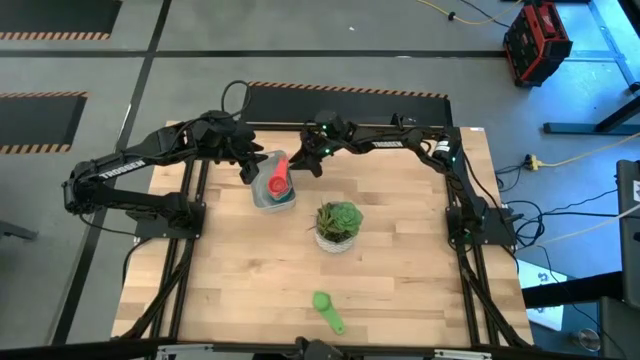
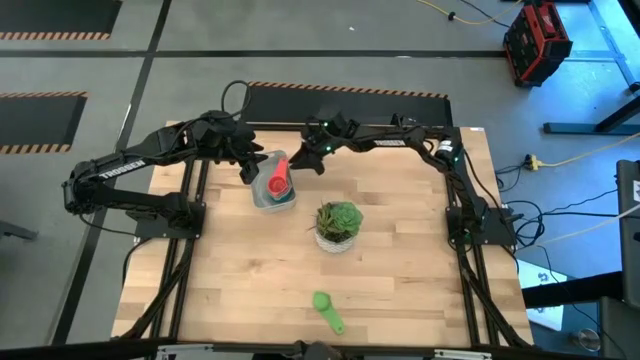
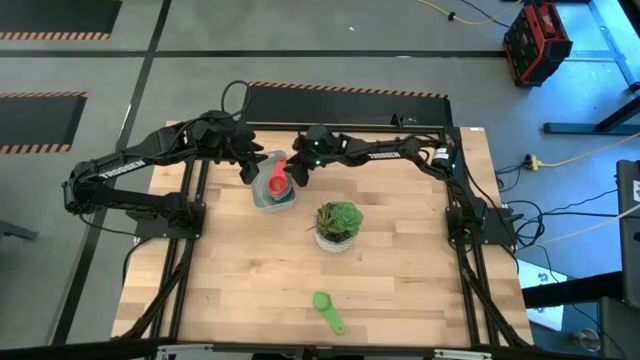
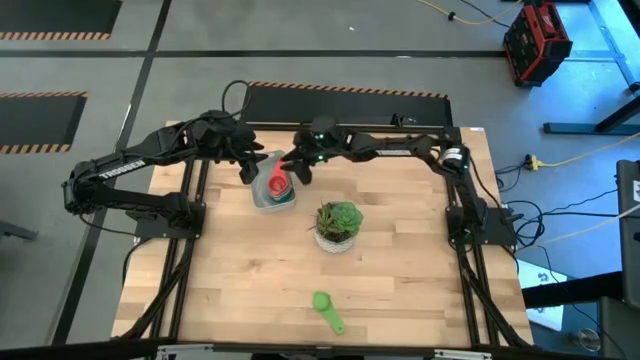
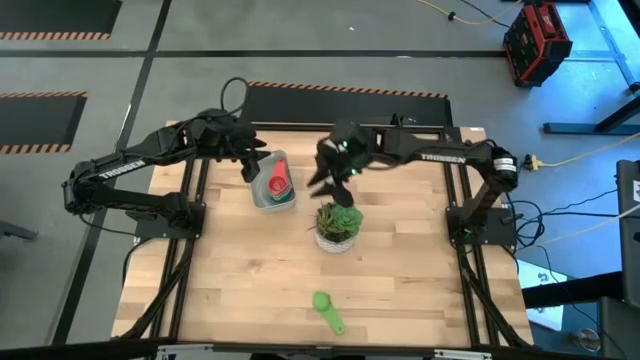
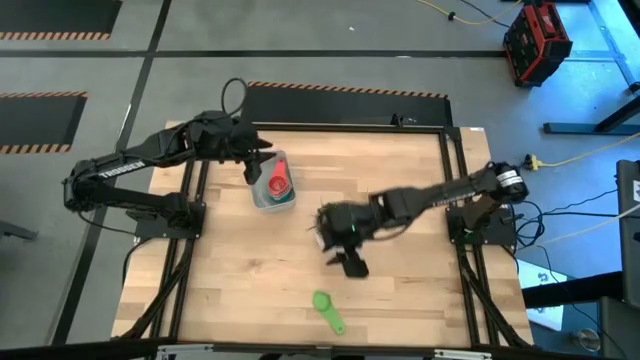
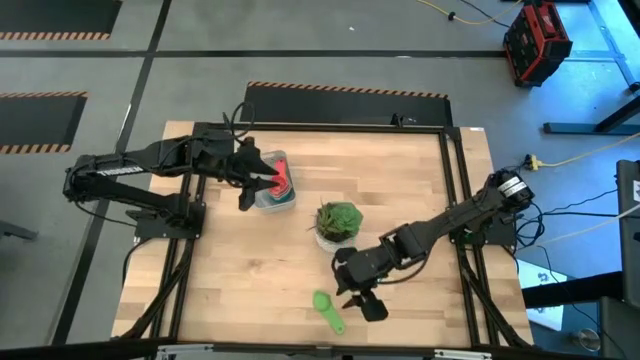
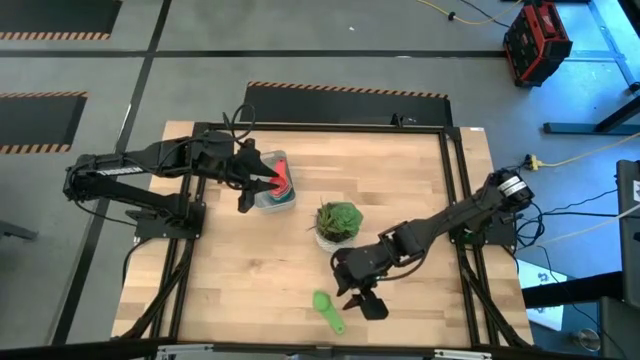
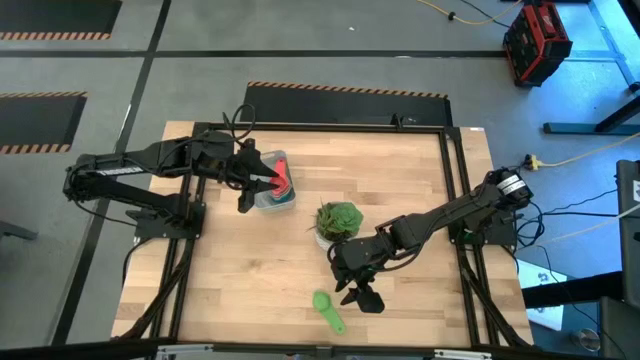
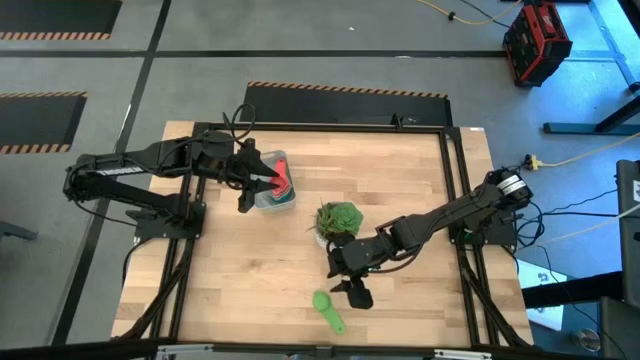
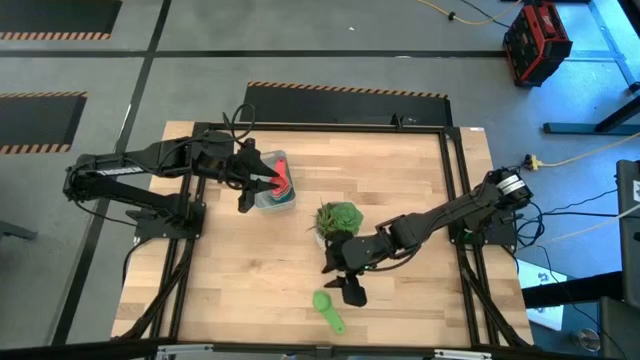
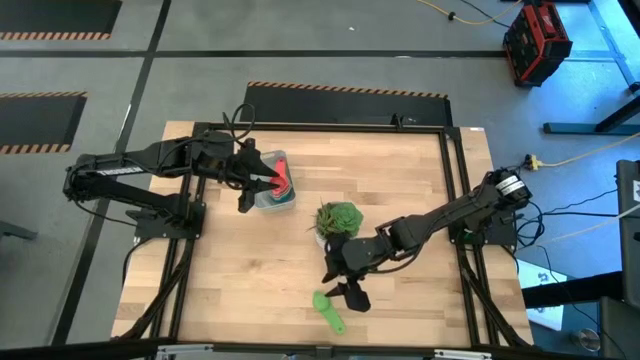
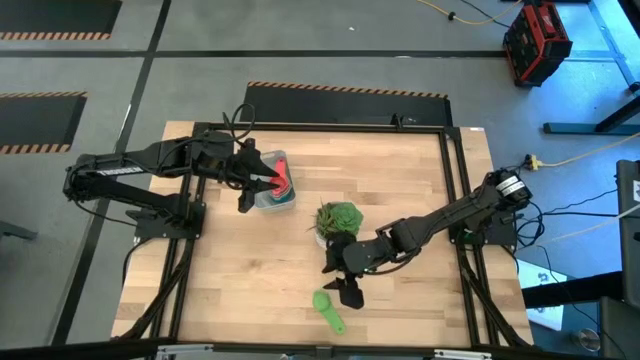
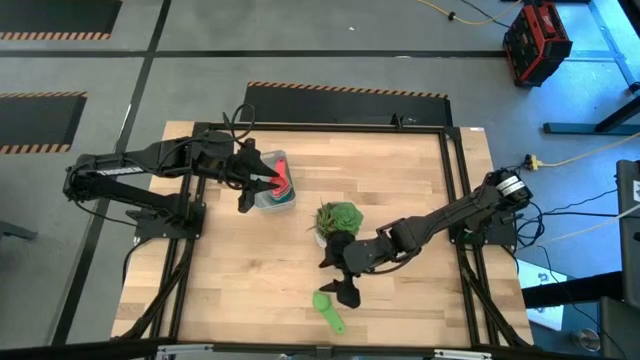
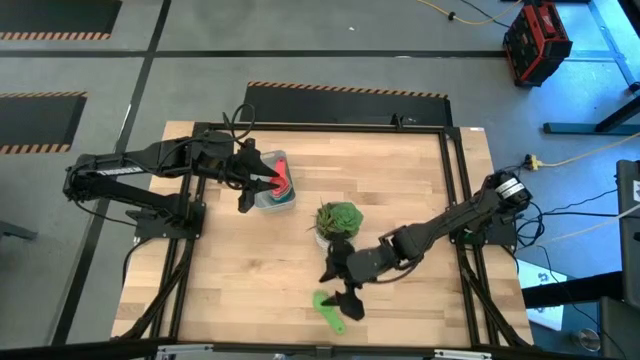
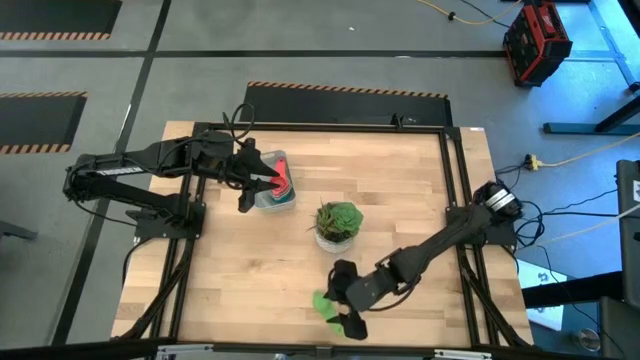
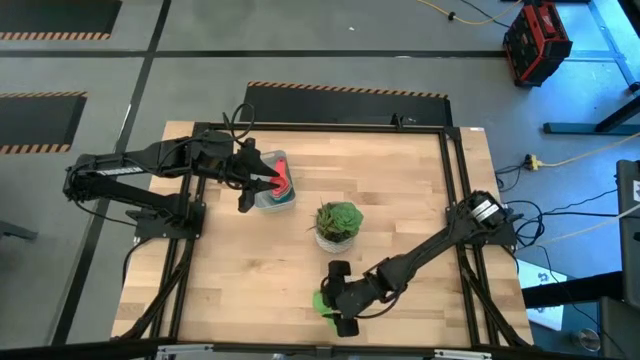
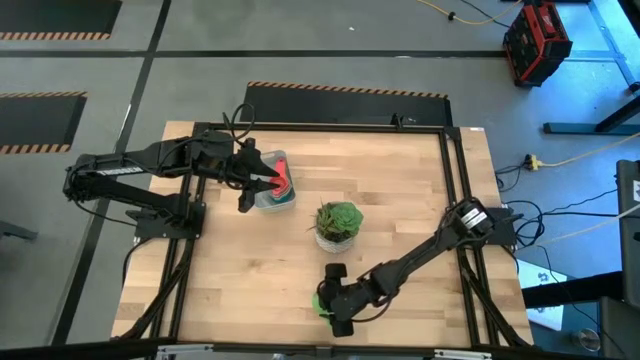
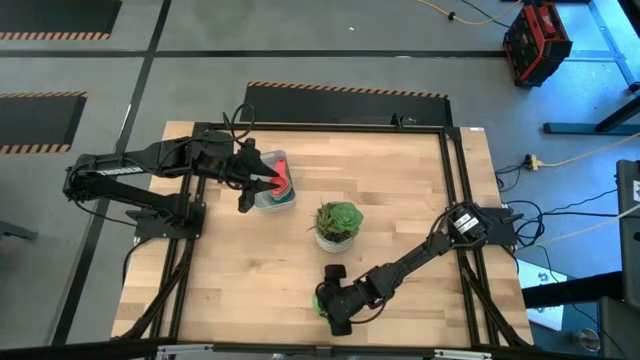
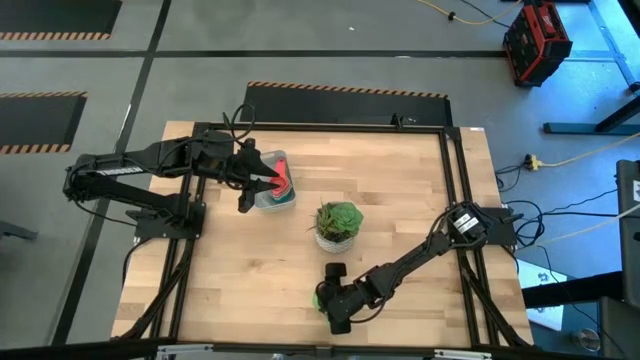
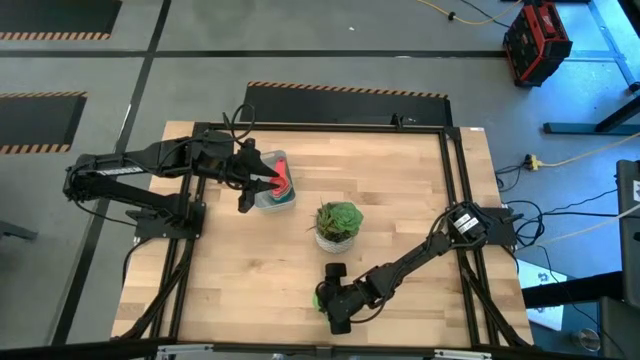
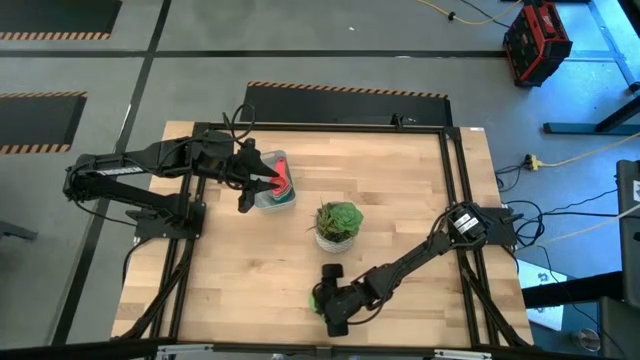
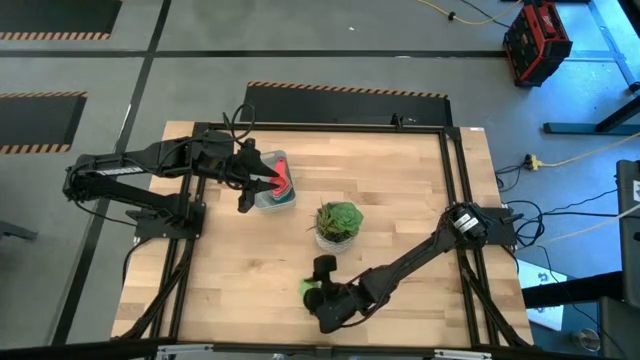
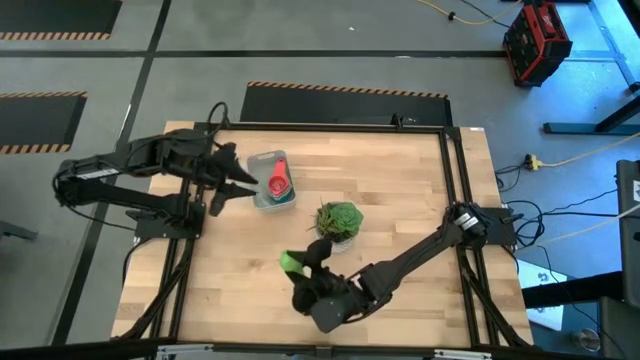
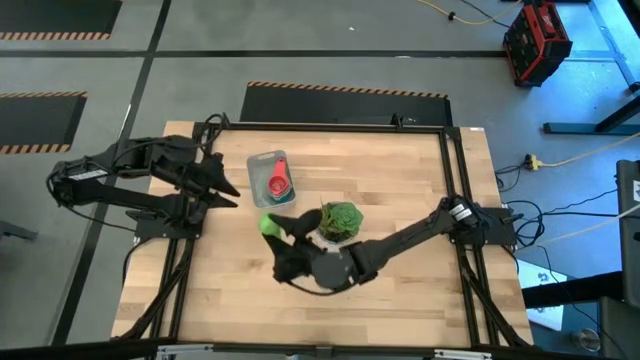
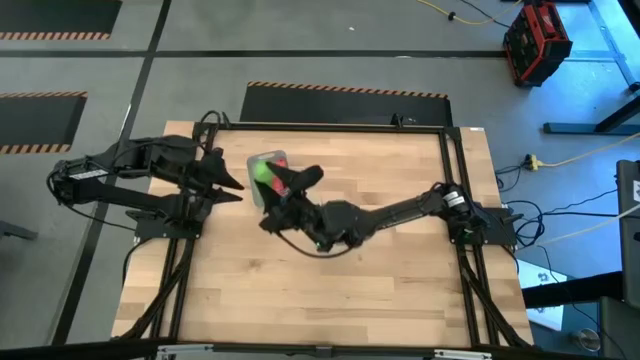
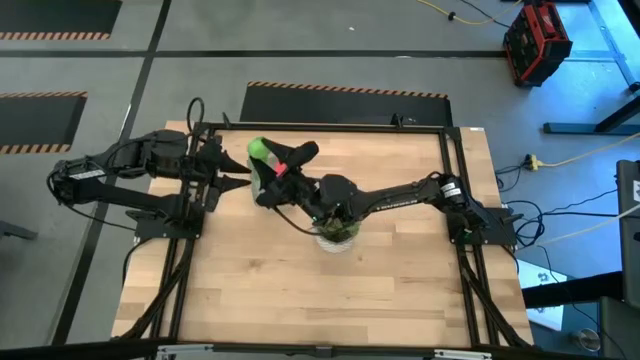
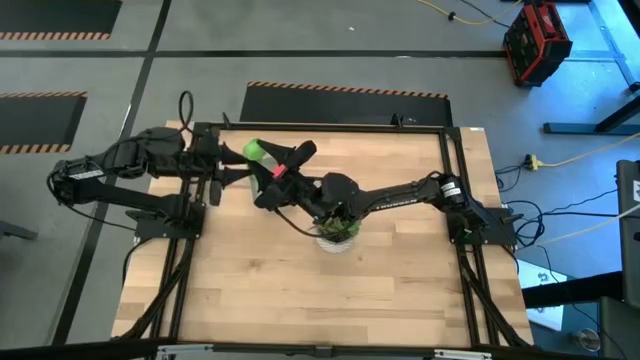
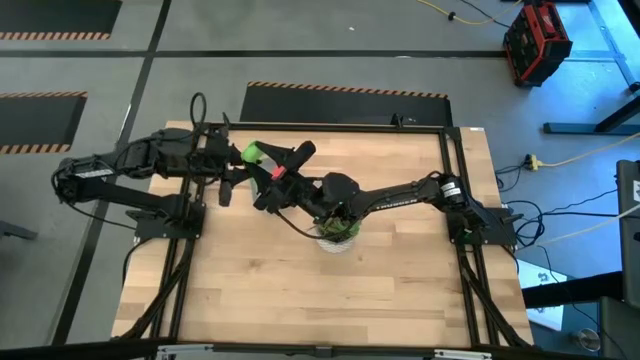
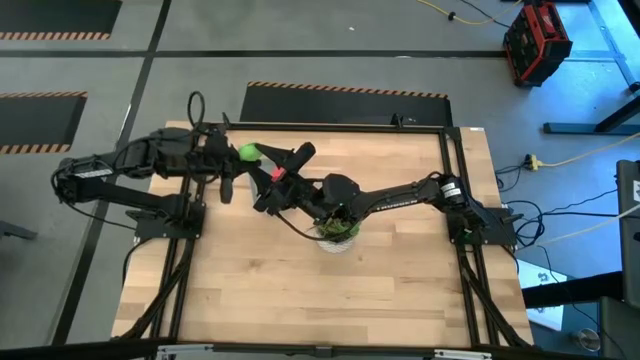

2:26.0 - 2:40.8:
Task: Nest measuring cups in basket
Stack the green measuring cup on top of the red measuring cup in the gray bin

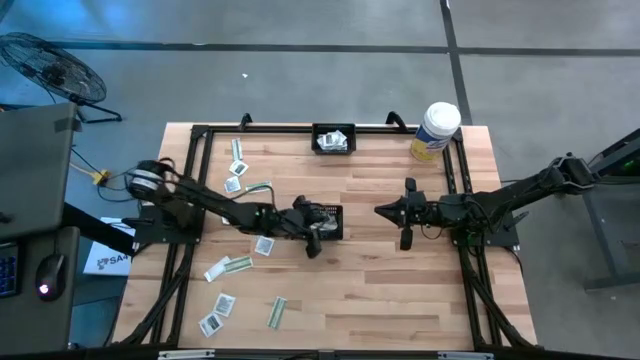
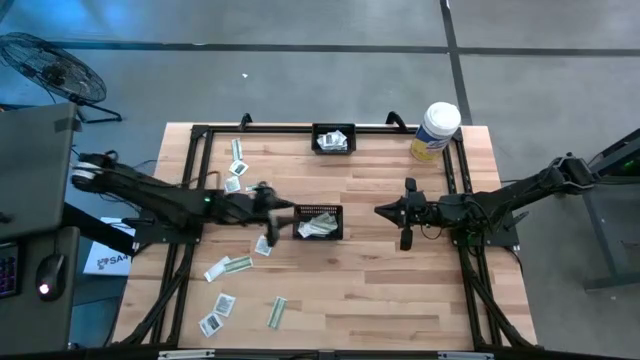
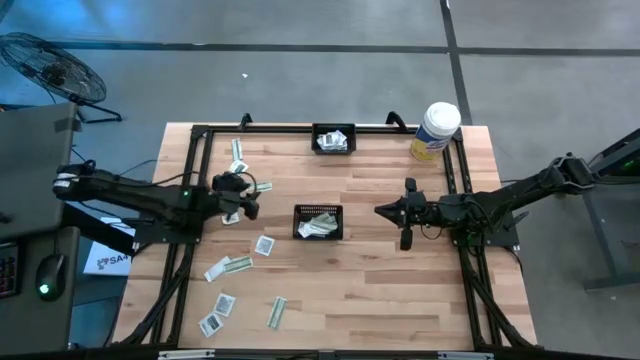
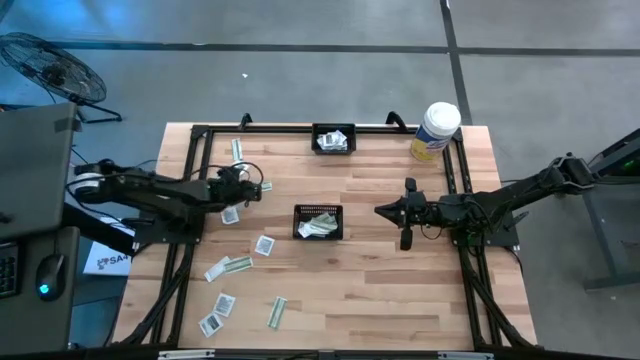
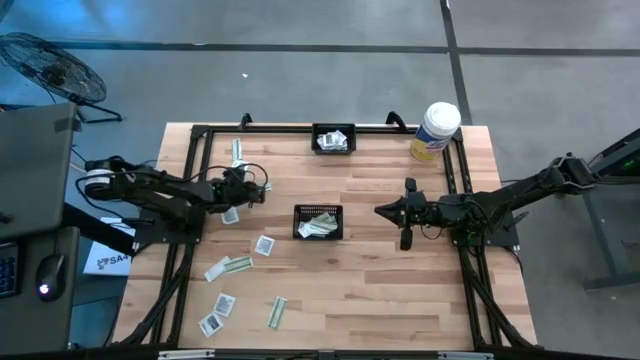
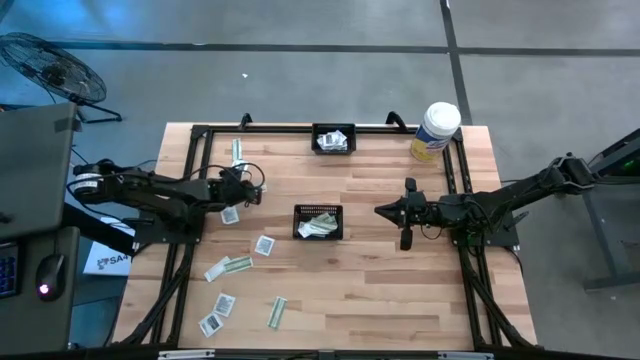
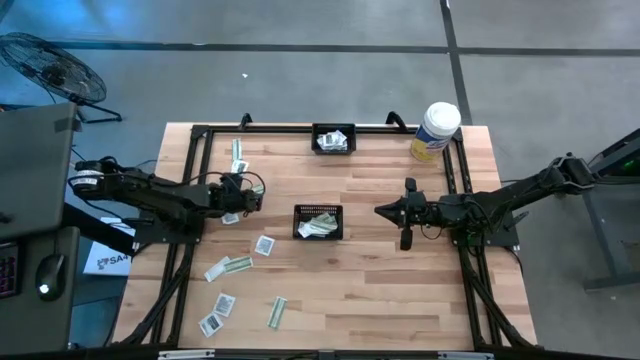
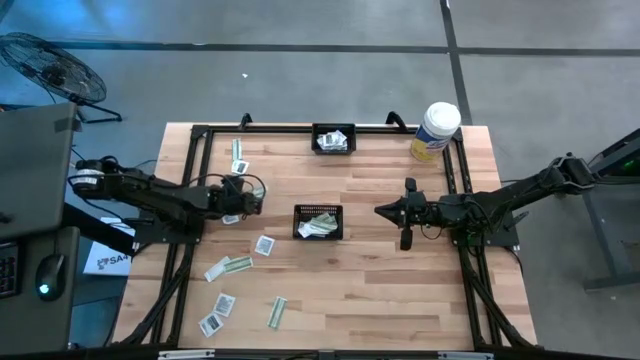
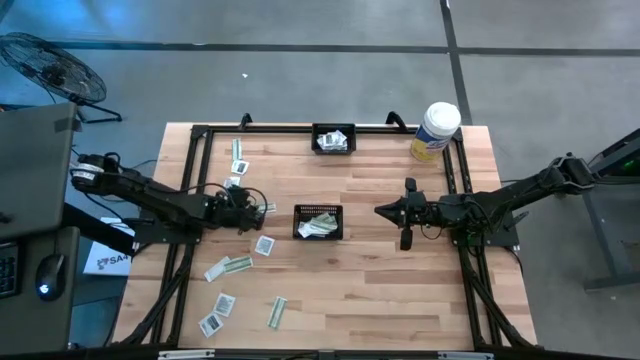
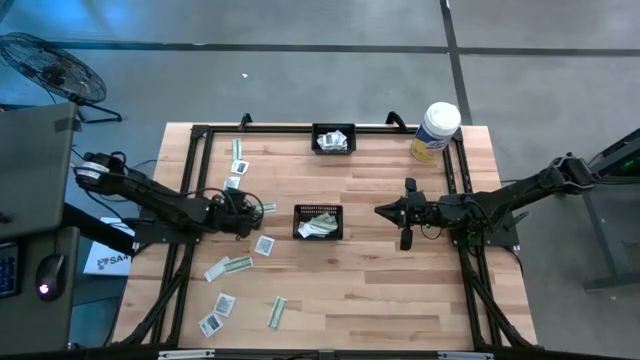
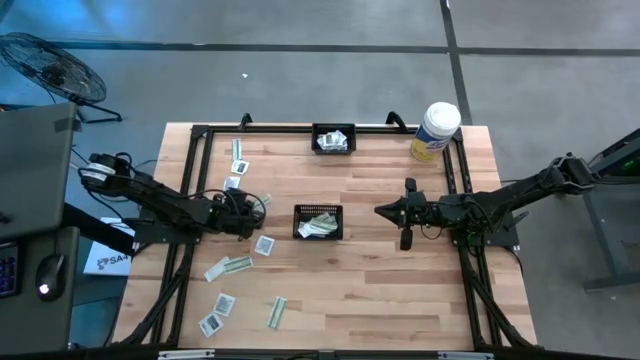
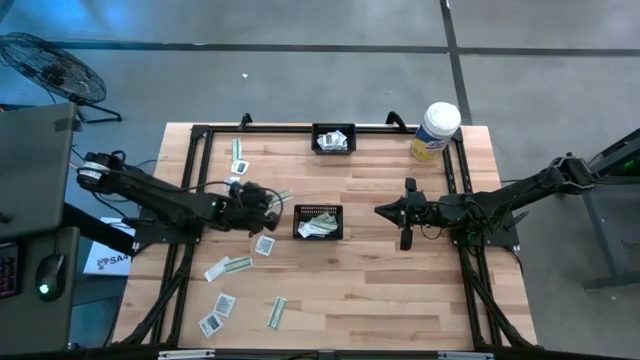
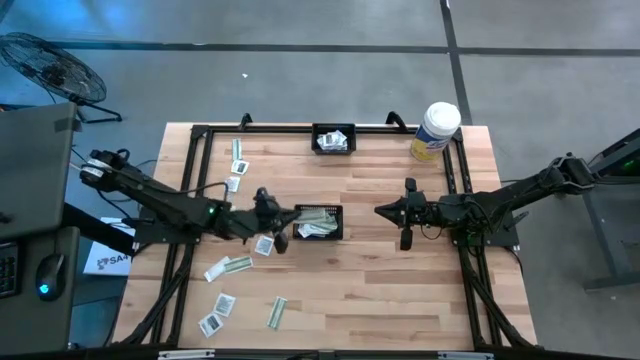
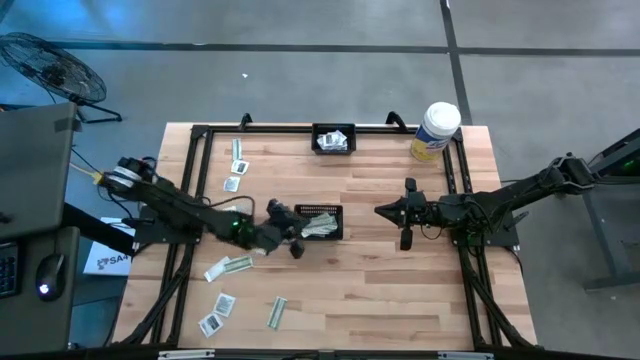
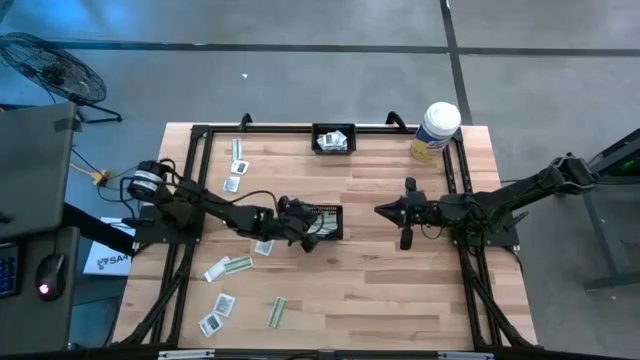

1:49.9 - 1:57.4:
Task: Pick & Place First Aid Supplies
Put the bandage into the bottom black basket
